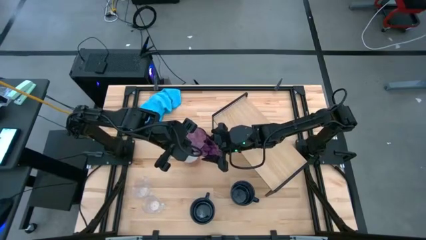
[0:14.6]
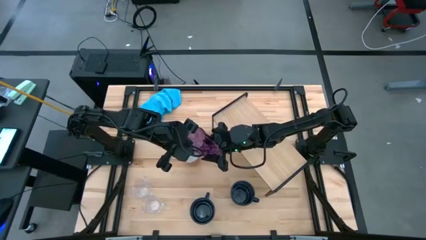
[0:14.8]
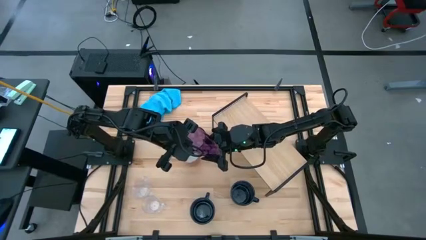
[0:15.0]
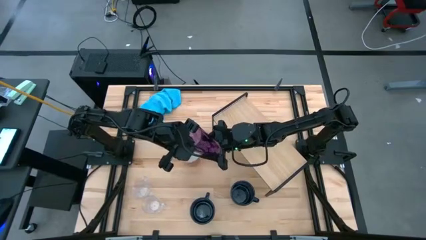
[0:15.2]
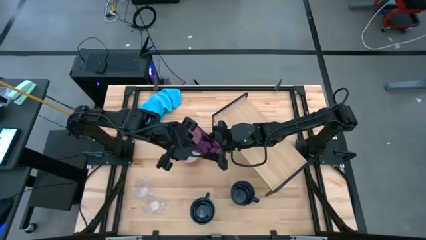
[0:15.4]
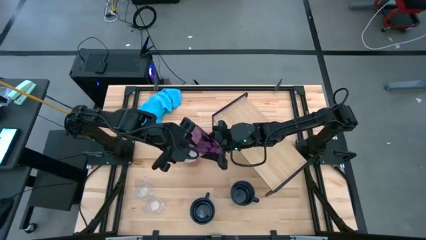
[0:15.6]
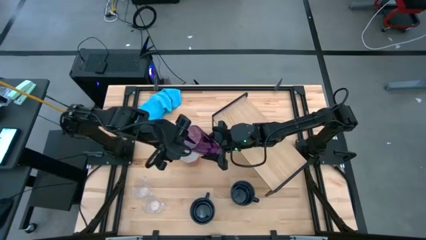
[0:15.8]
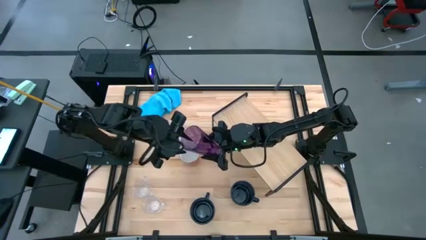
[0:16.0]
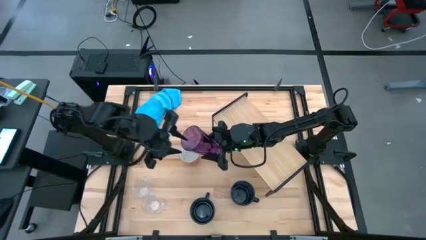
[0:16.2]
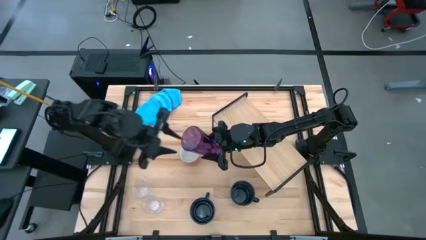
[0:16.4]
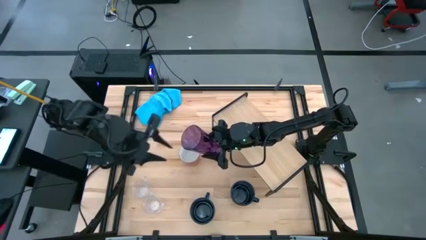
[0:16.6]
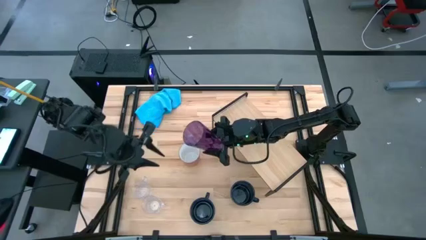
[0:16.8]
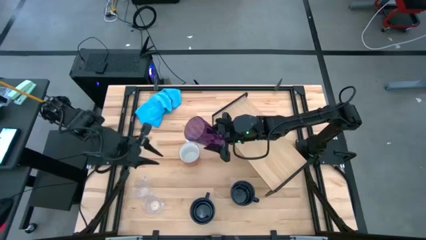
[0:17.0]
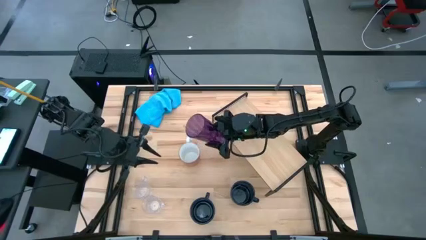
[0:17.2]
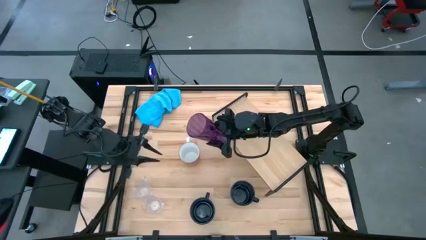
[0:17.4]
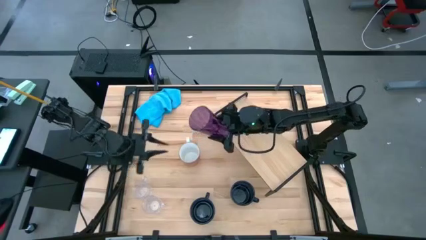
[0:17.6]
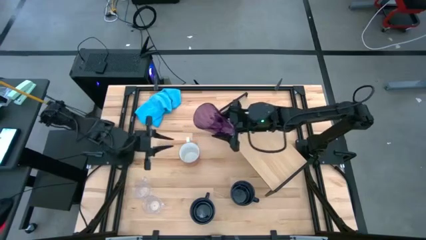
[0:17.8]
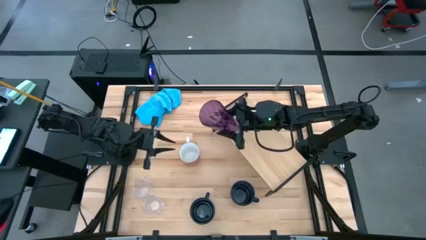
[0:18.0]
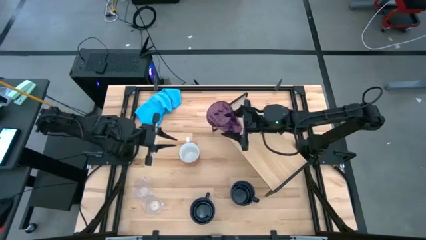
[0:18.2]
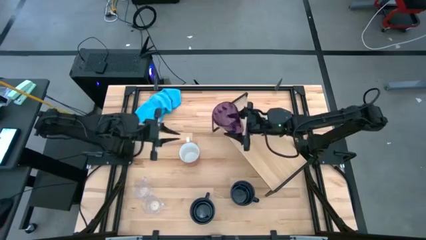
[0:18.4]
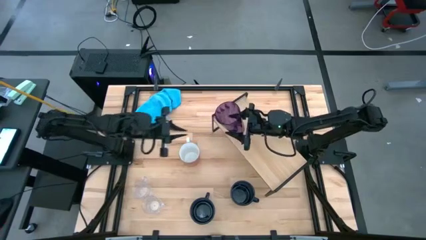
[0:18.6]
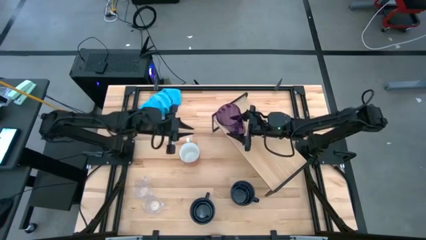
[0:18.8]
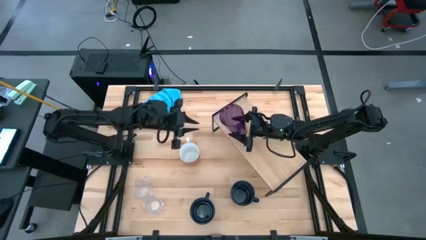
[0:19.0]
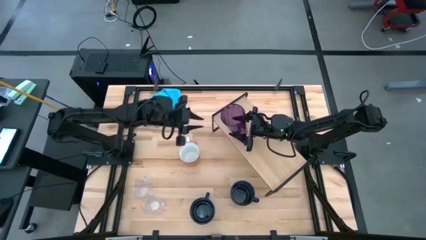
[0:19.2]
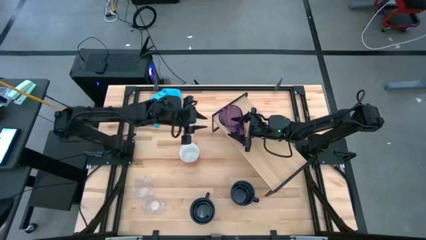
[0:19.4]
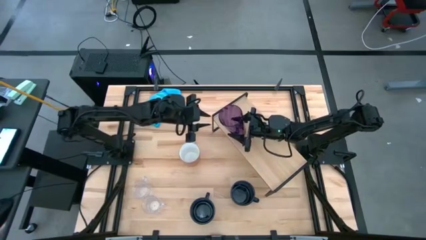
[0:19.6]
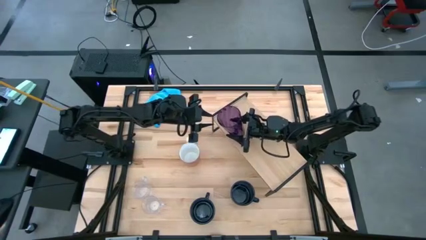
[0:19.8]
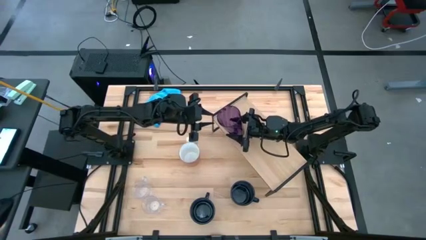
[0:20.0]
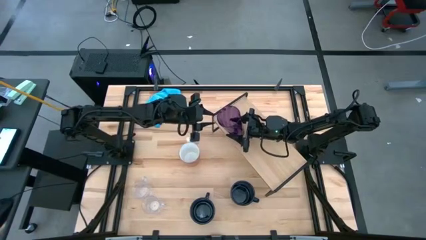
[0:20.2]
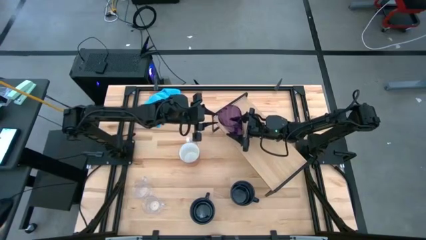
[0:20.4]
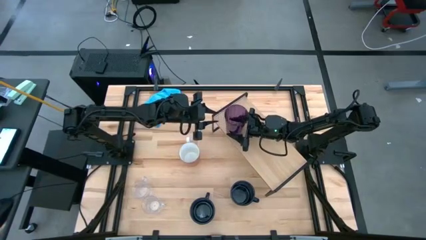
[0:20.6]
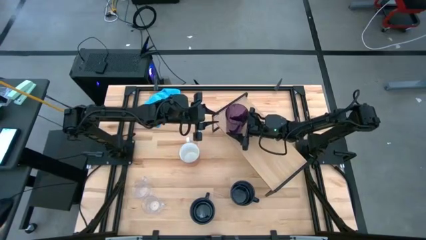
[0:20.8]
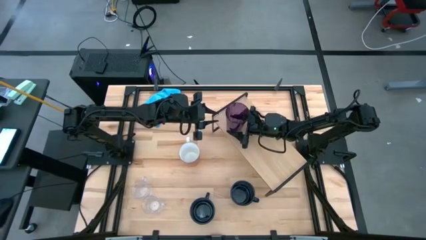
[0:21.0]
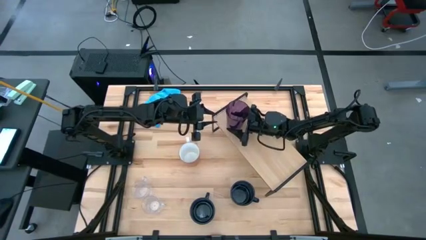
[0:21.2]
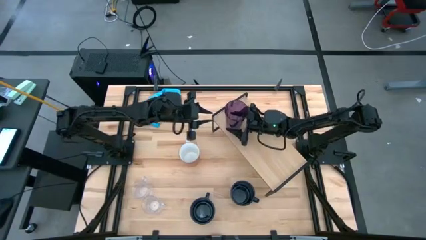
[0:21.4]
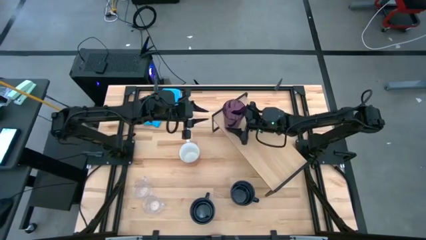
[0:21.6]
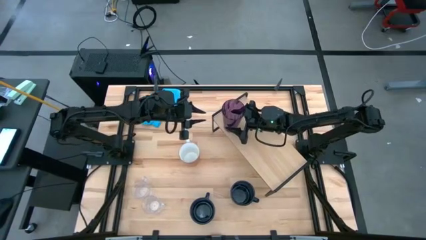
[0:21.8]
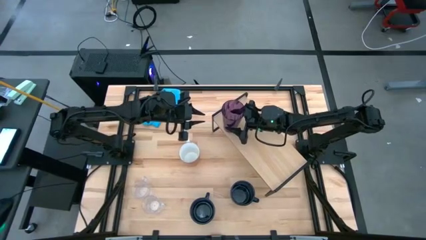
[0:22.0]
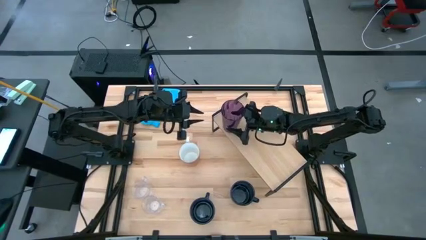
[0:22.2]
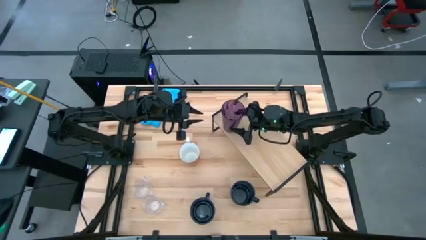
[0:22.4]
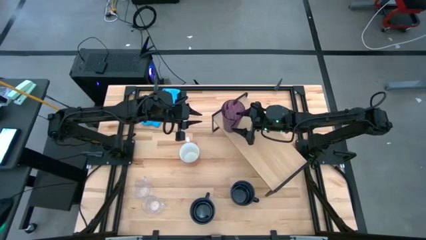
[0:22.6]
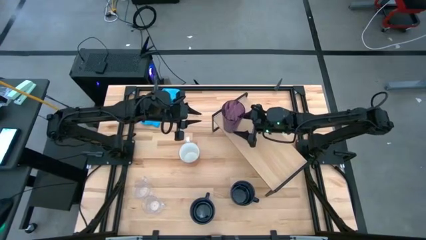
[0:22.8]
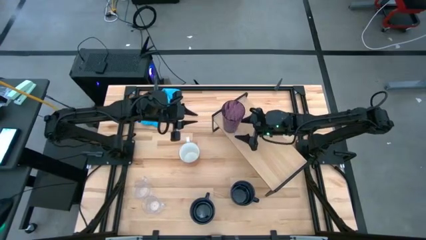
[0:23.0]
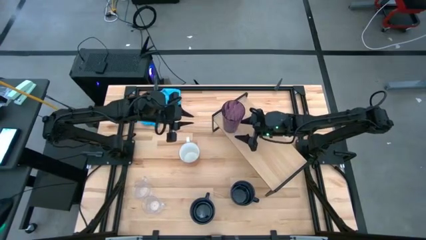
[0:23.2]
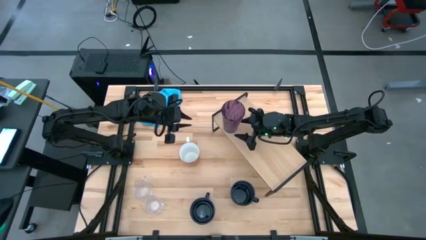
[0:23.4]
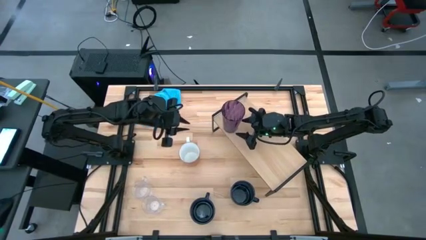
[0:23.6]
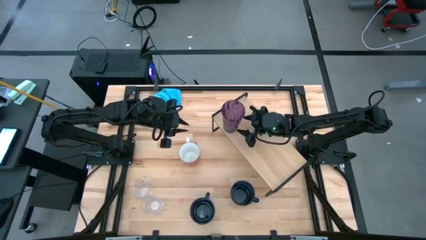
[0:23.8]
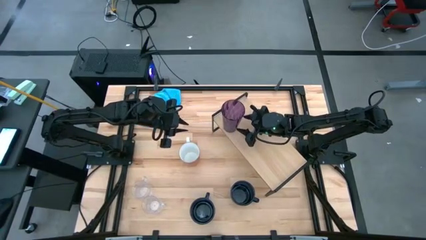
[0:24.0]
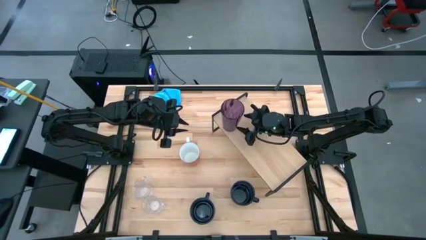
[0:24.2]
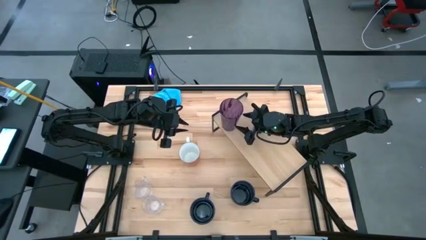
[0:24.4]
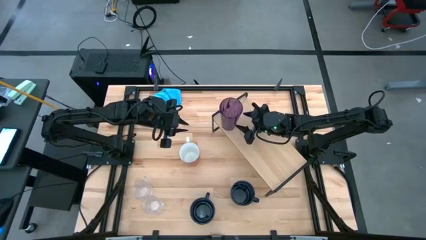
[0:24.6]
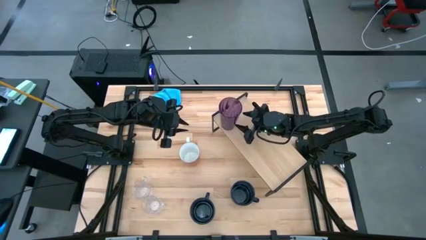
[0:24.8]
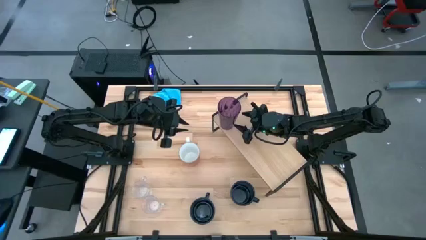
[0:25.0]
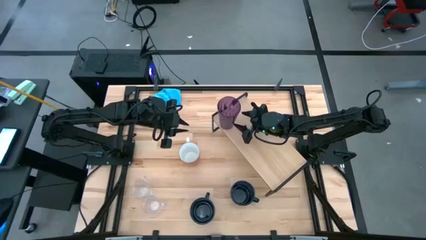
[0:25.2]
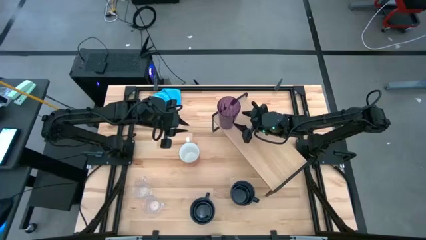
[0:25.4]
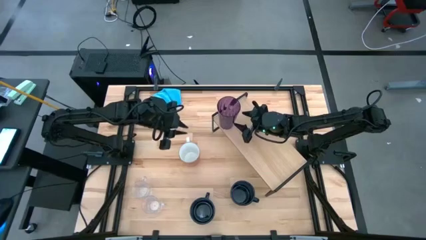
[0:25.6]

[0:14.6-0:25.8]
Task: Stack small to large cups/mugs on shelf
Put the purple cup on the shelf
